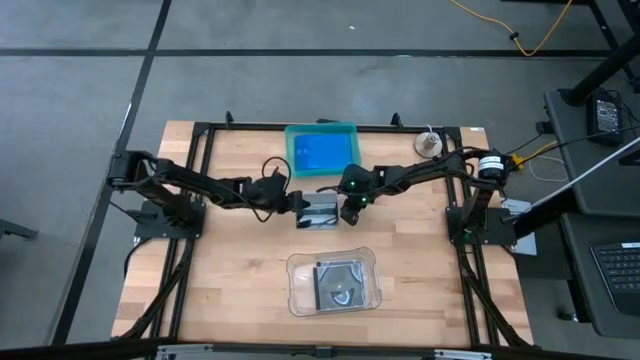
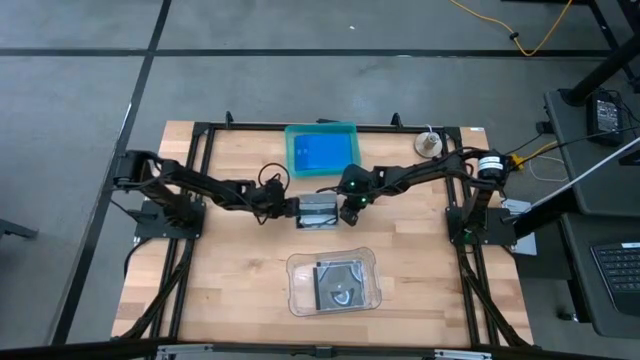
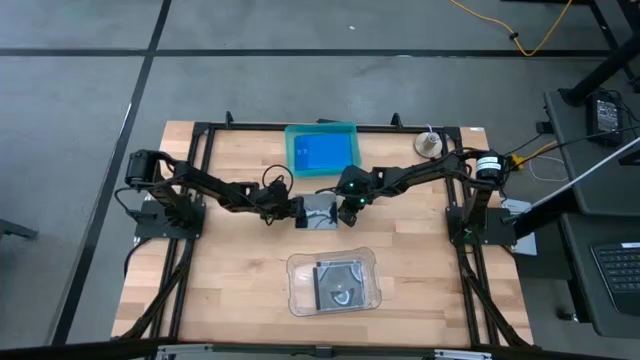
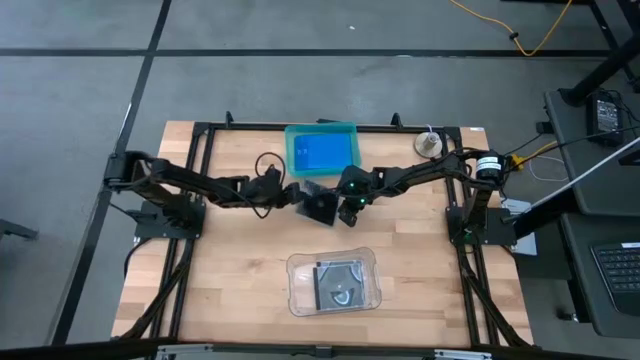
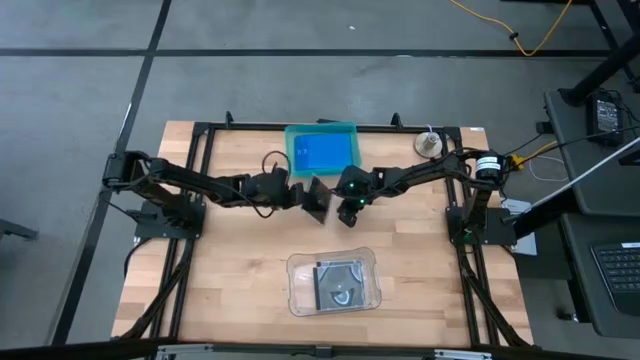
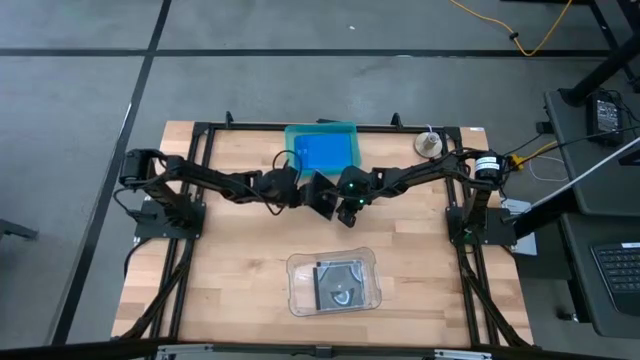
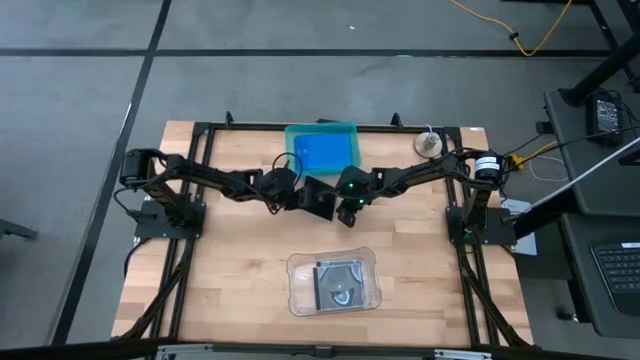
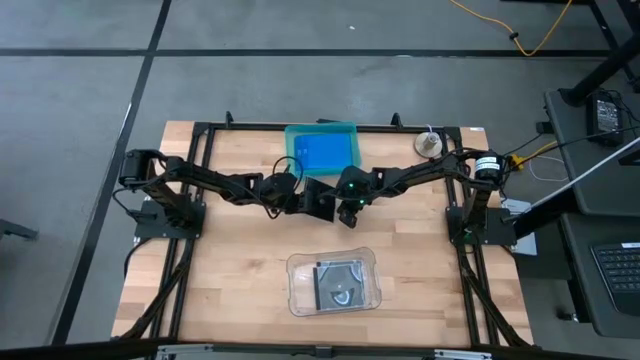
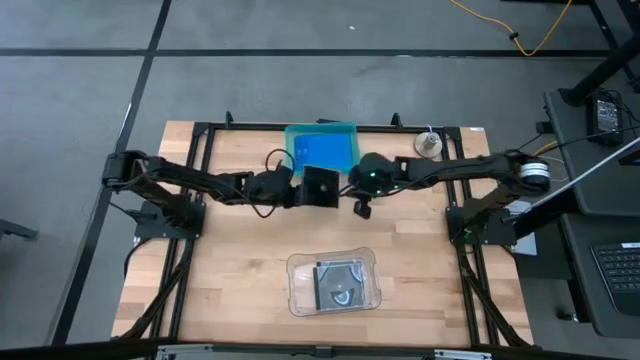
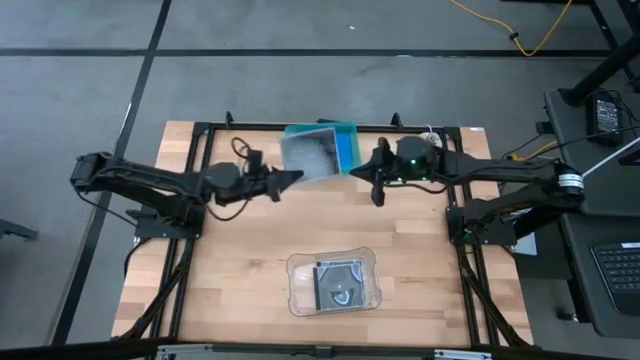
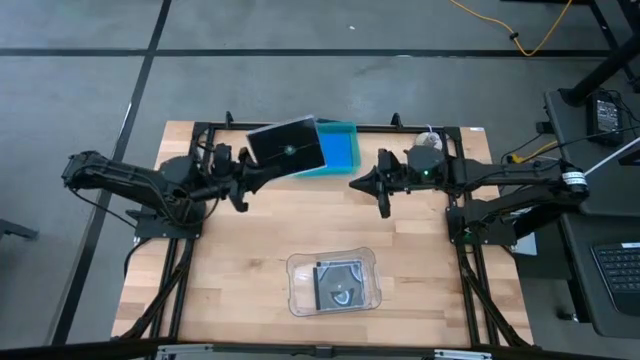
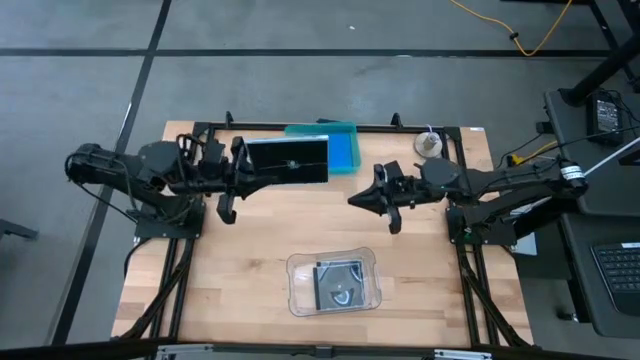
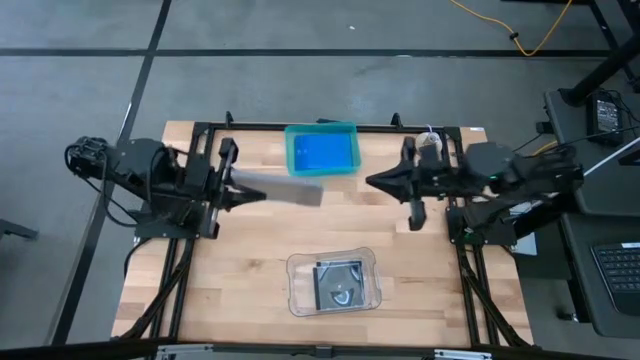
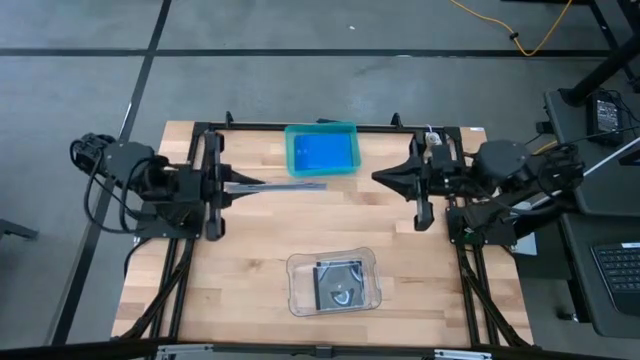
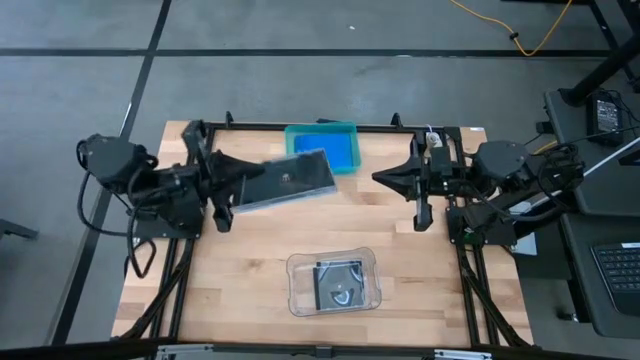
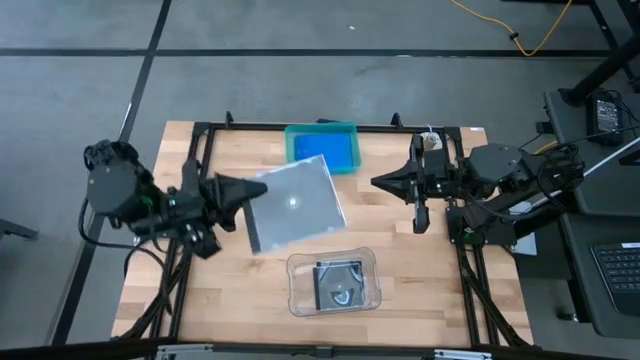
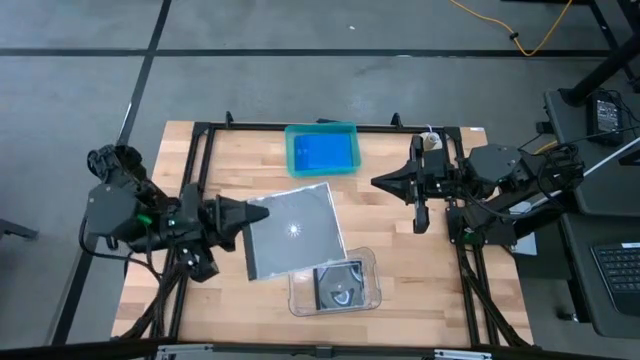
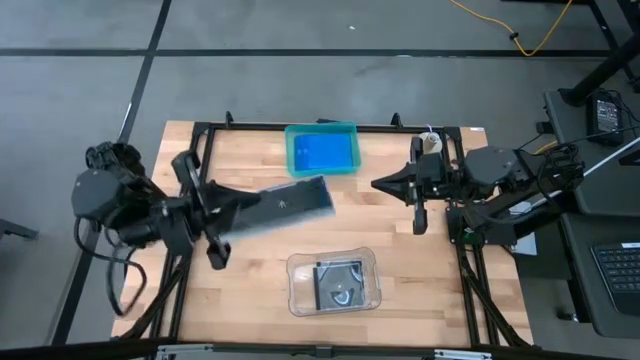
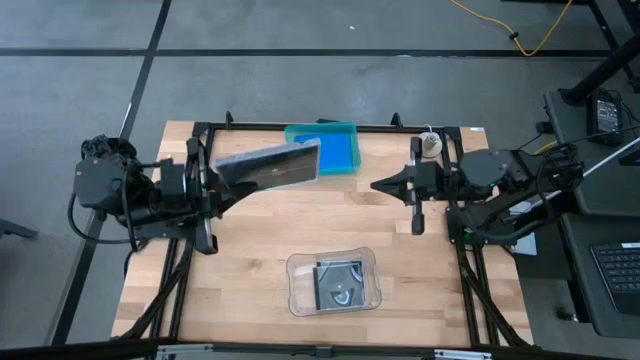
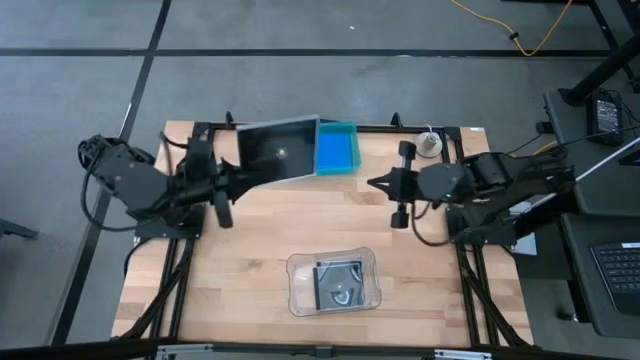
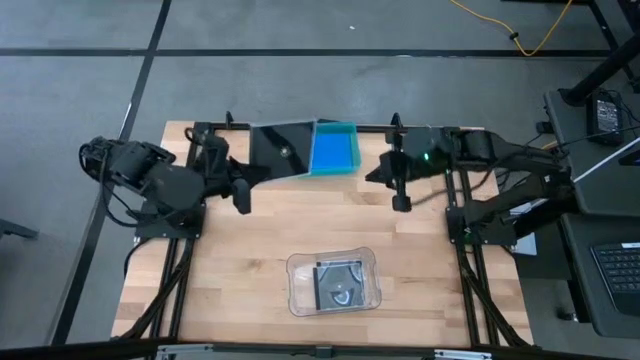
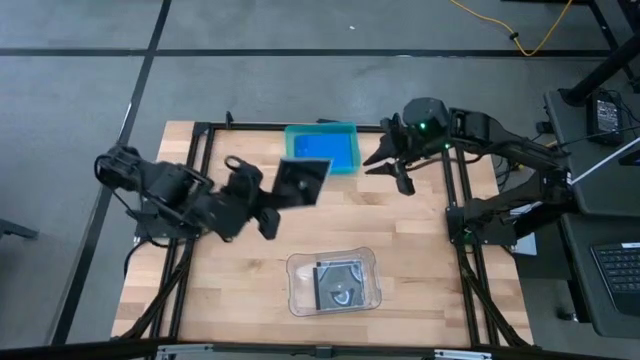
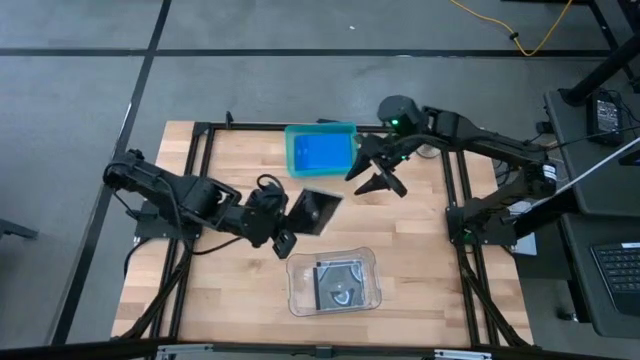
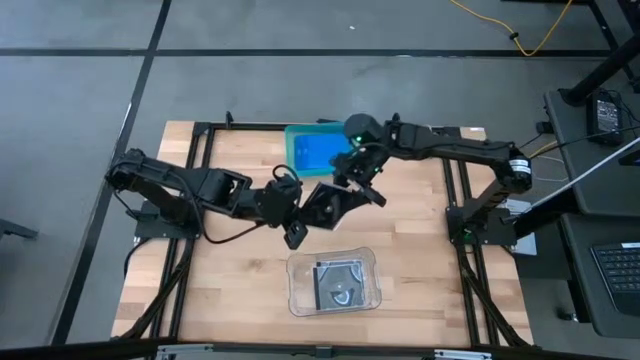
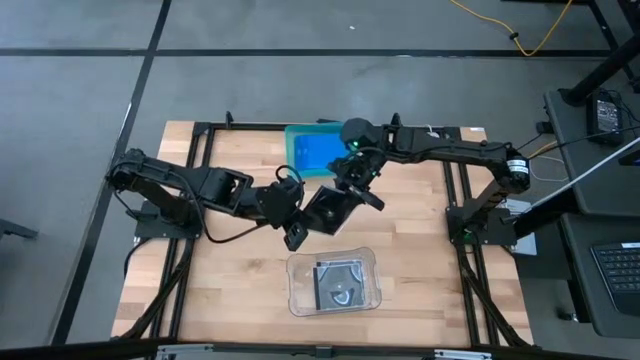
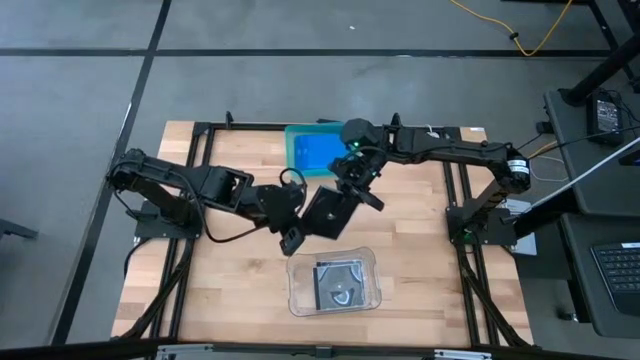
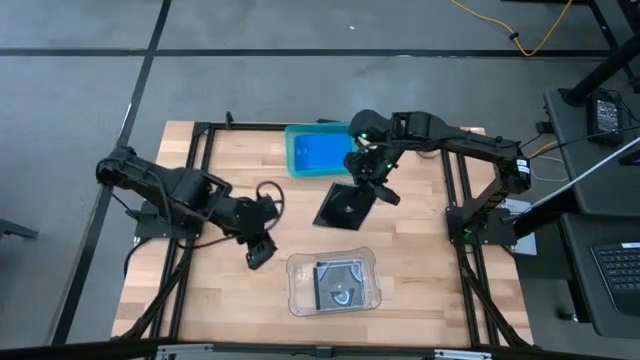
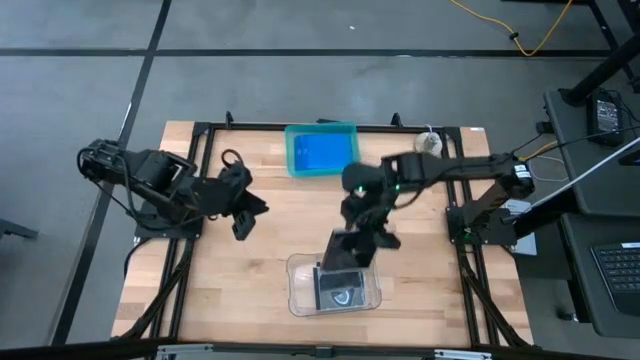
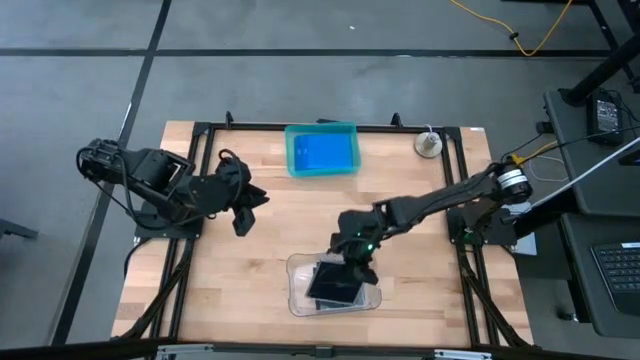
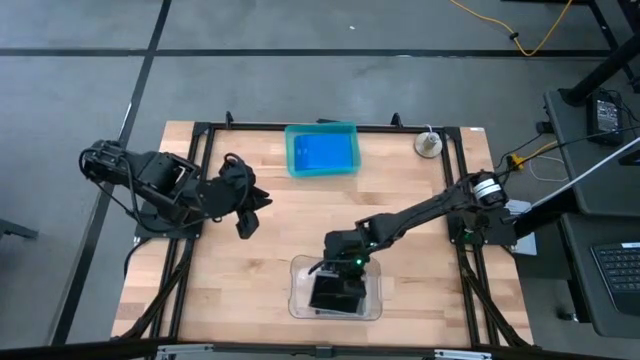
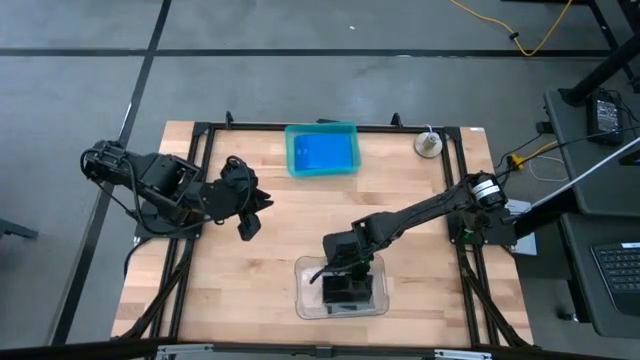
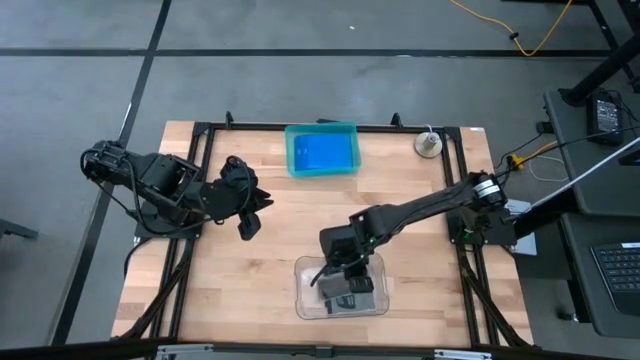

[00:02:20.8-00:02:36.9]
Task: Pick & place jewel cases by type
Put the black CD case into the transparent bin

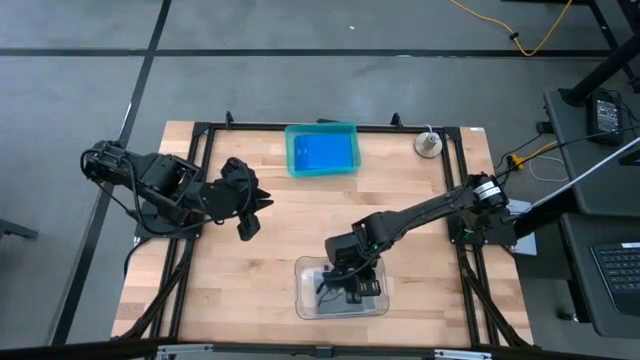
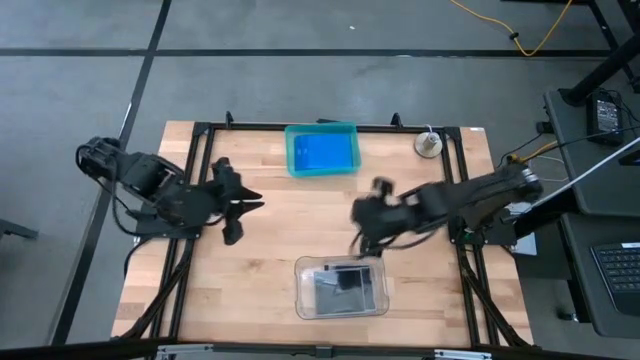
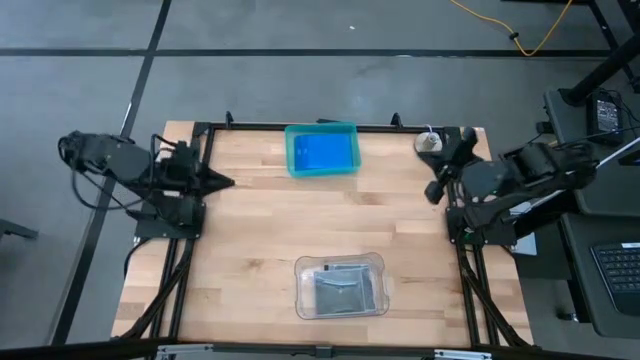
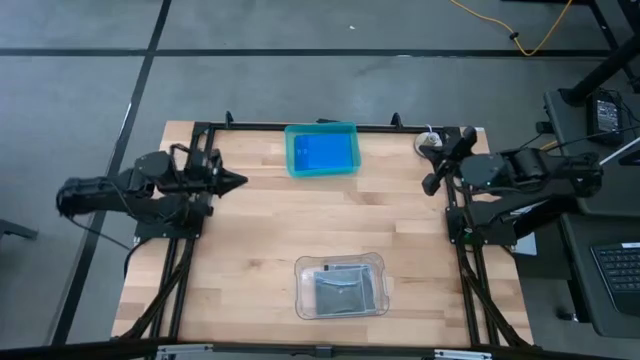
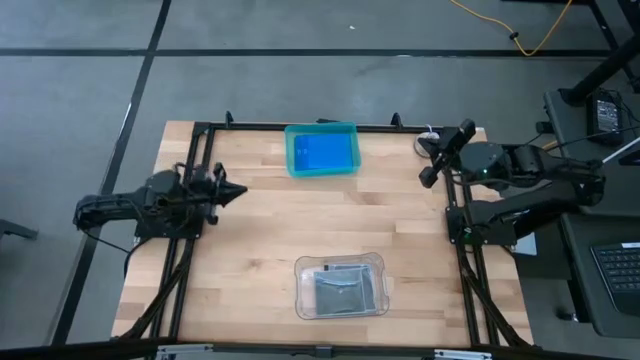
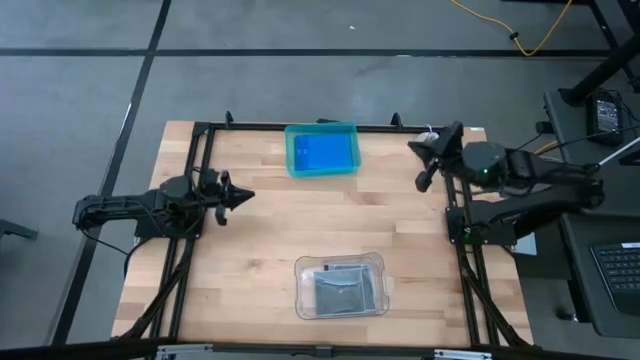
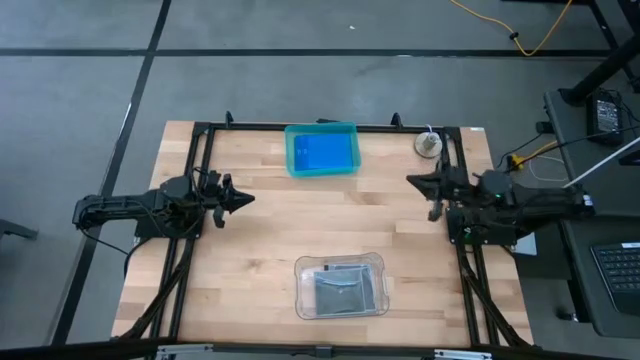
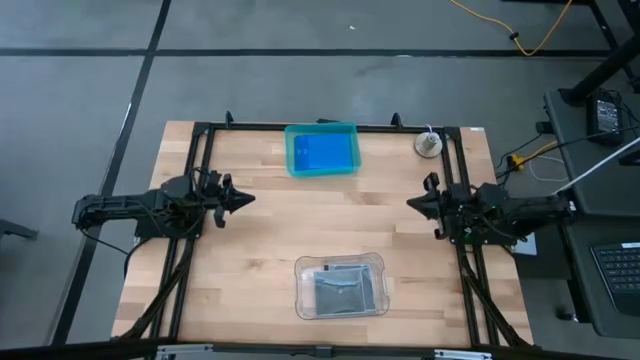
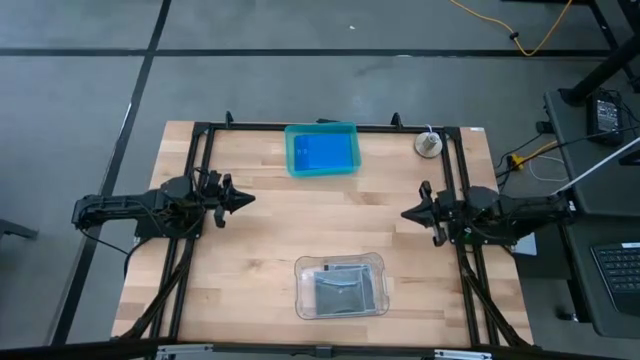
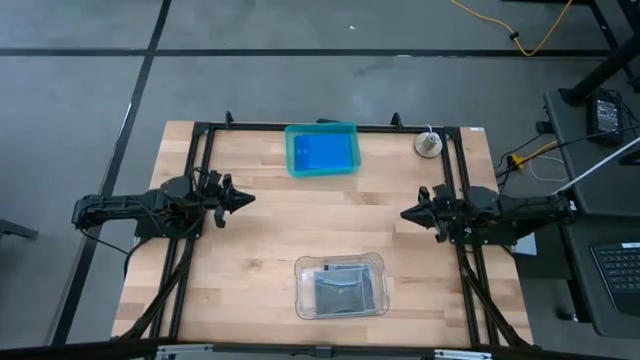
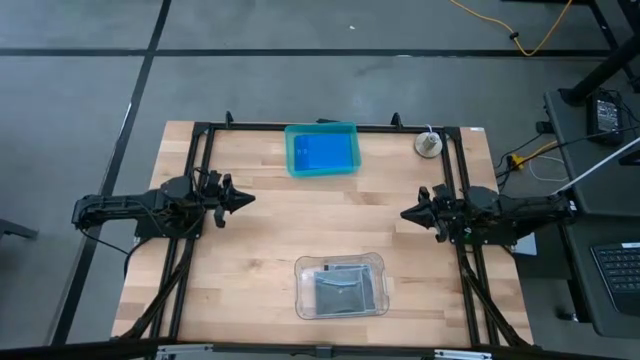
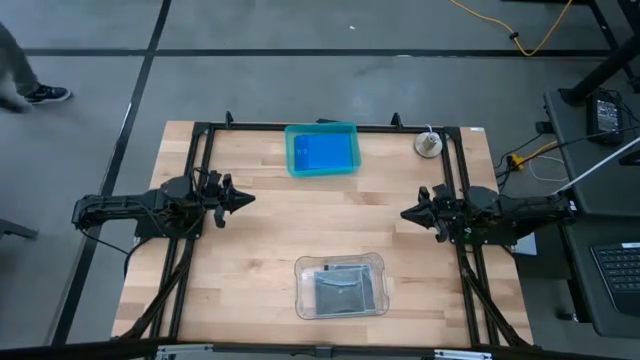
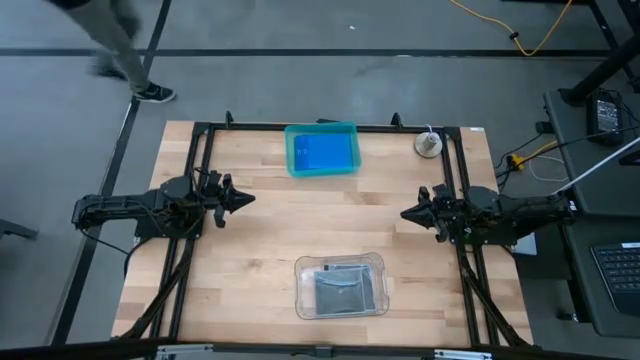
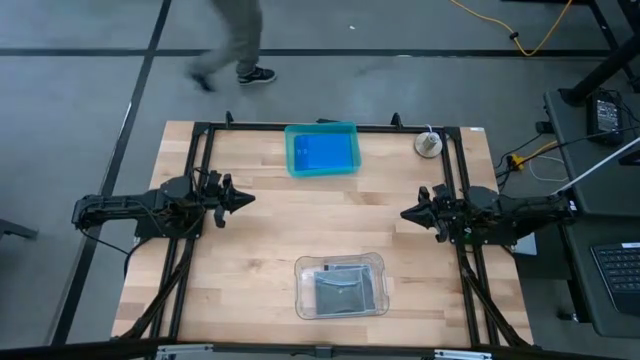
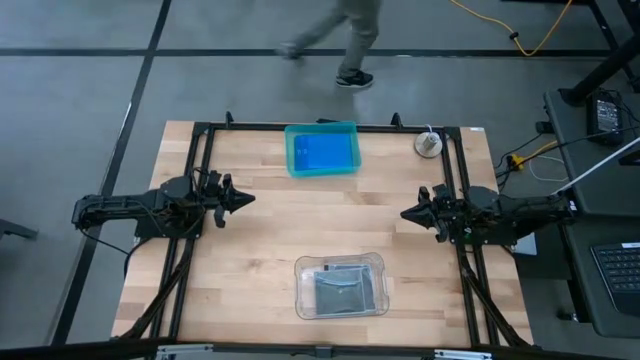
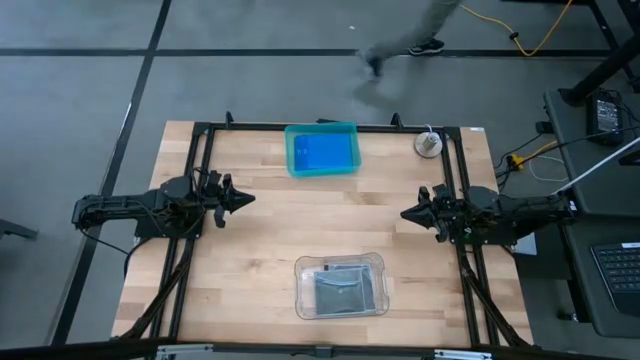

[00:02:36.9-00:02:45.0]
Return to Home Position
